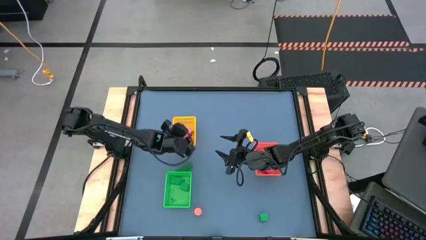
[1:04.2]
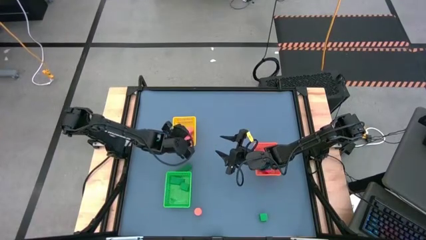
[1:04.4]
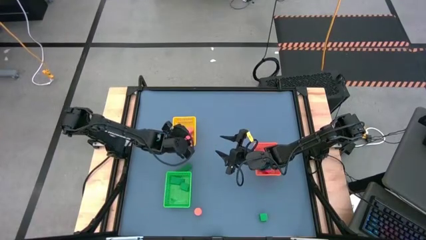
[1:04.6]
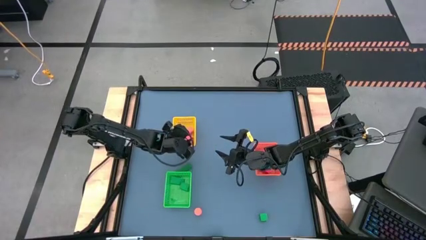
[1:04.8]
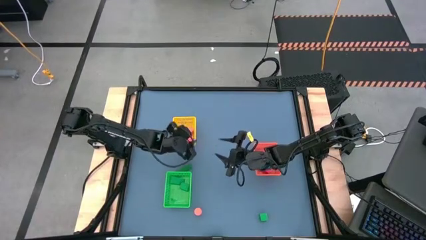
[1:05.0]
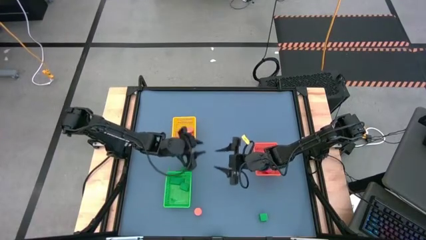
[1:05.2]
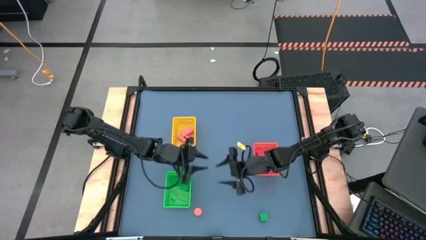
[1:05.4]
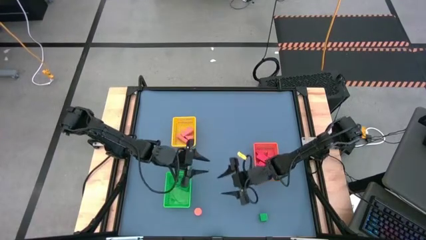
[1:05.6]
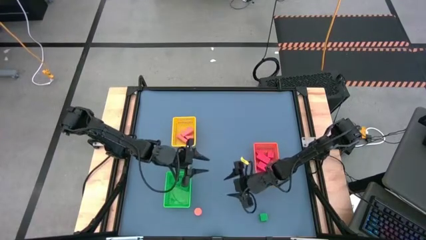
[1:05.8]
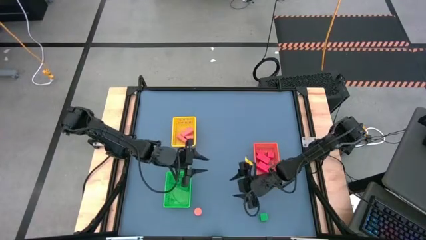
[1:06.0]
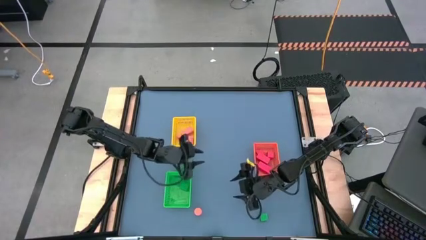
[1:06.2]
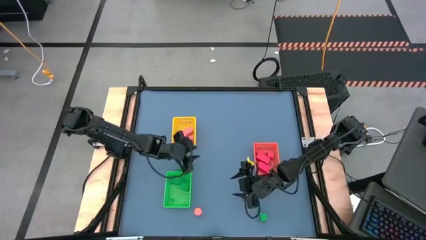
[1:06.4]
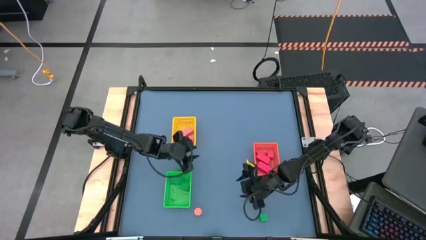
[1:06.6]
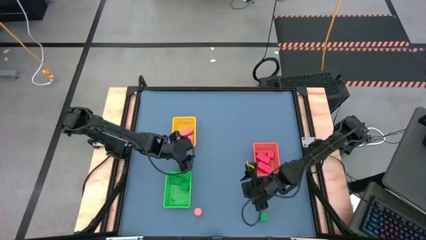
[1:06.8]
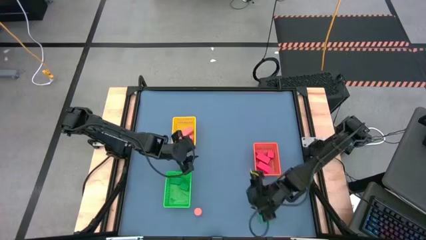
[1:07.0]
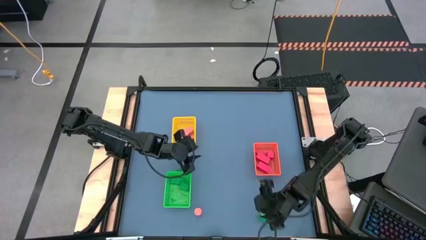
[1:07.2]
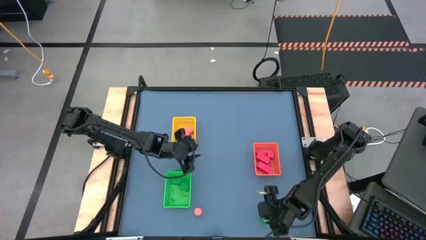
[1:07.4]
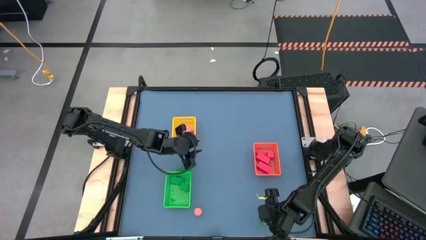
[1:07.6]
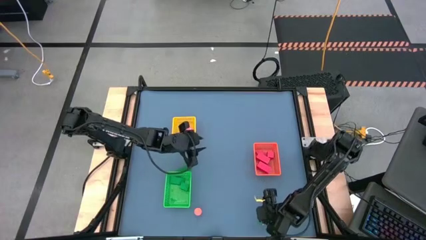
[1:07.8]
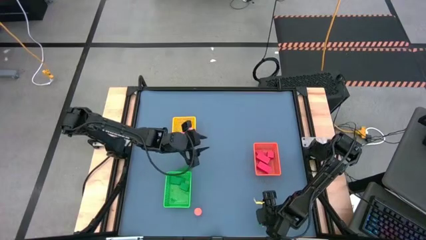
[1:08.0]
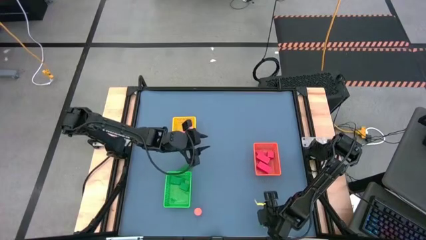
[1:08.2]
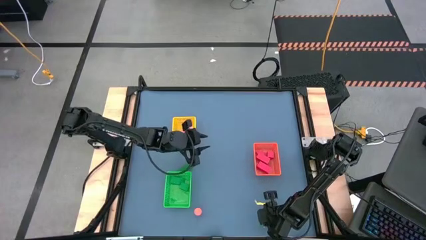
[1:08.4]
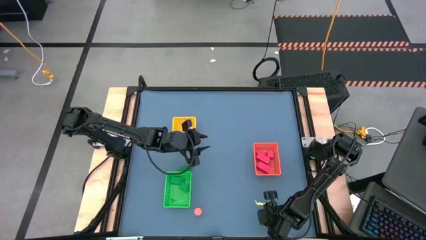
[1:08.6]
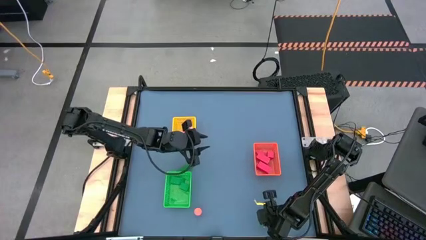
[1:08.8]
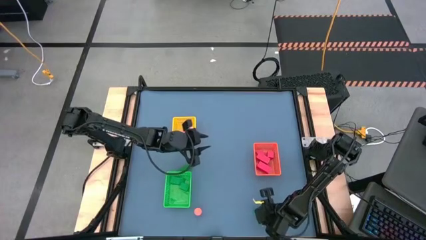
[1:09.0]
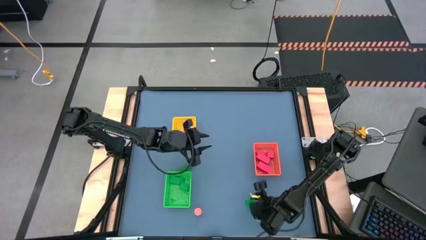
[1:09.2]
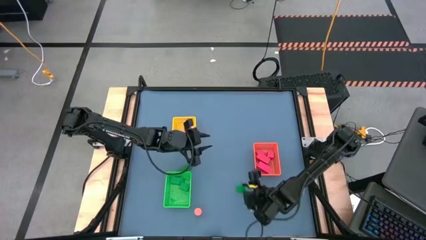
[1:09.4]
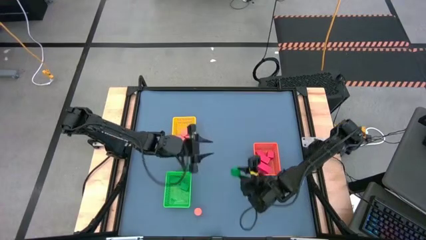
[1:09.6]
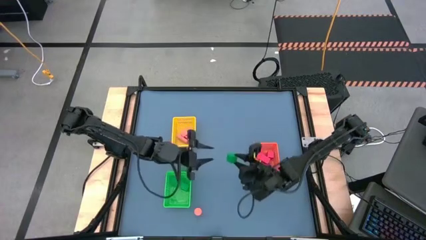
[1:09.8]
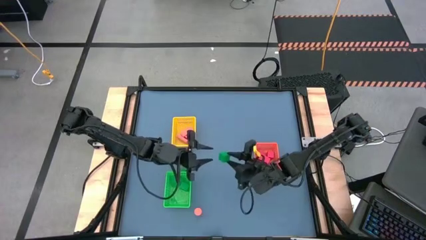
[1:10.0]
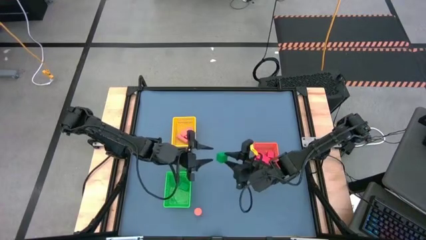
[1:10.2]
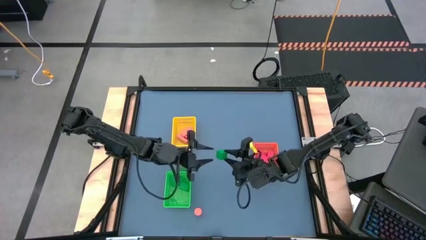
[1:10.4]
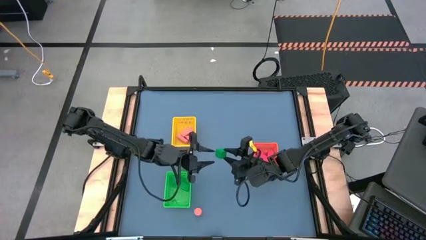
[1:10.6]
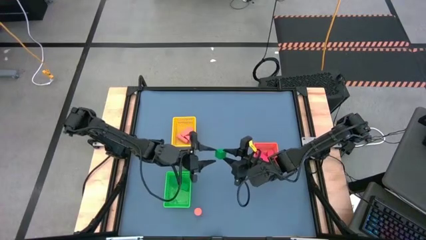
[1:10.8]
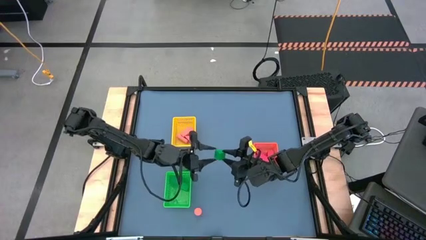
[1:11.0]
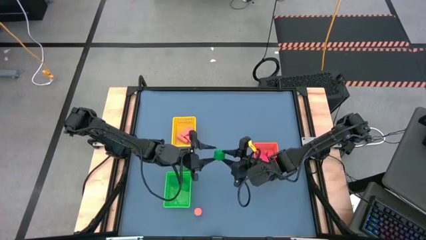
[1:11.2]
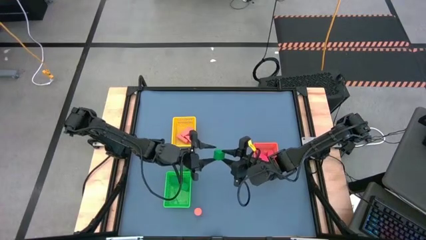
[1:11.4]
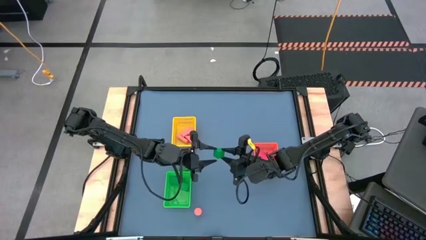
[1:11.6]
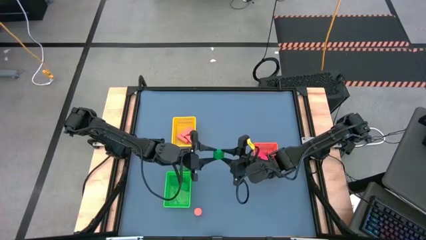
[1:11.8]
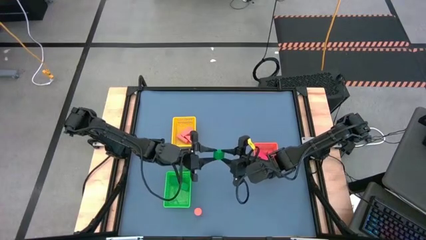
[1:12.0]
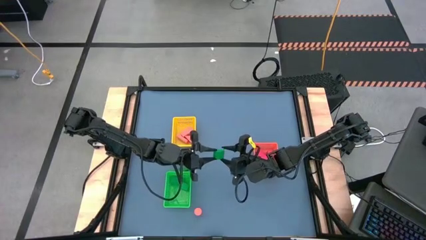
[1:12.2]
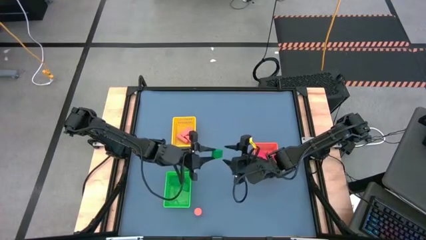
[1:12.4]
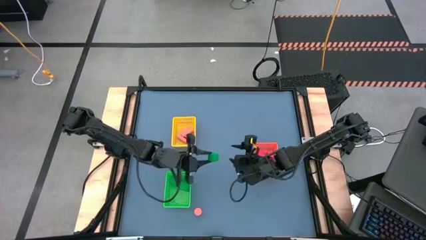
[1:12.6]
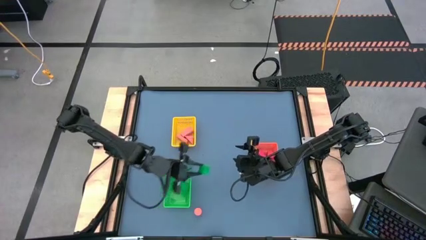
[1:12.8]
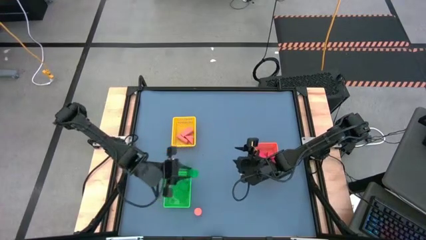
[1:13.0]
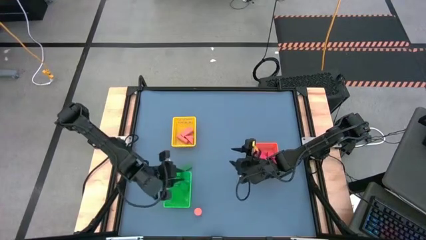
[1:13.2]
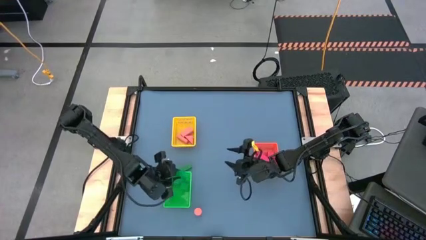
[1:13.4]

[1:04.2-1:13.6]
Task: Sort & place blocks by color
Put the green block into the green bin

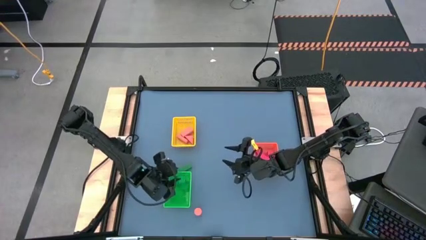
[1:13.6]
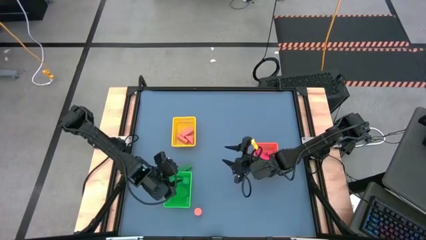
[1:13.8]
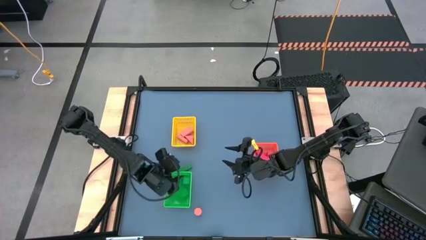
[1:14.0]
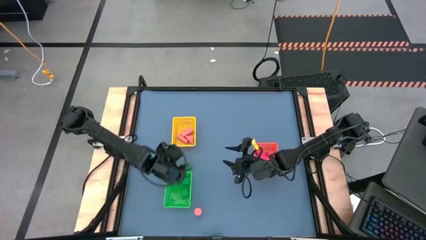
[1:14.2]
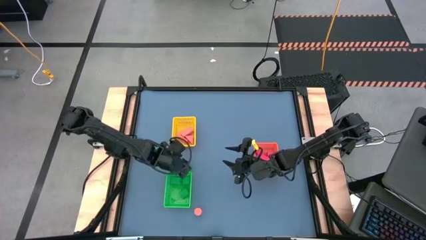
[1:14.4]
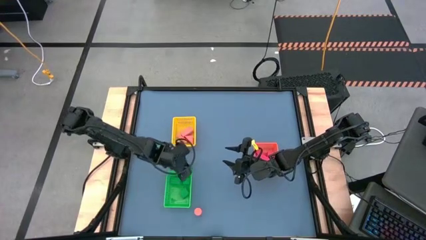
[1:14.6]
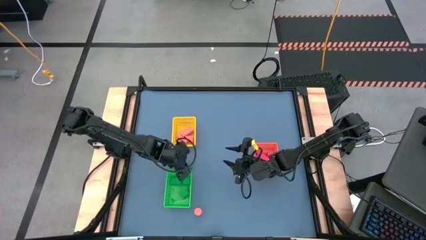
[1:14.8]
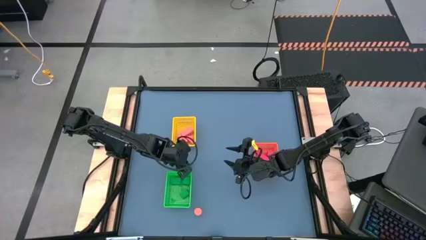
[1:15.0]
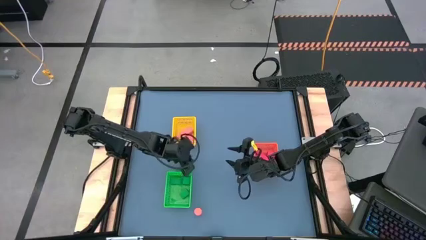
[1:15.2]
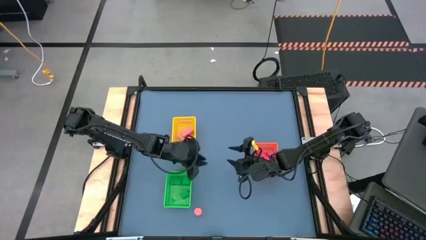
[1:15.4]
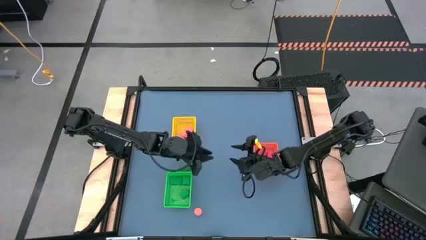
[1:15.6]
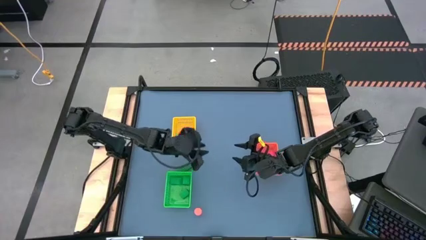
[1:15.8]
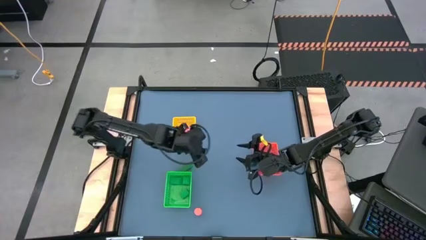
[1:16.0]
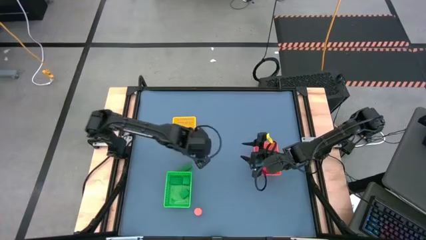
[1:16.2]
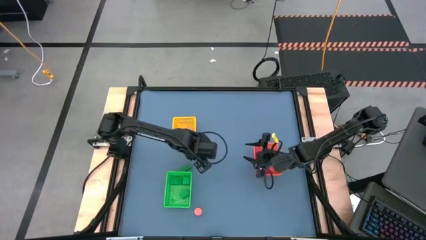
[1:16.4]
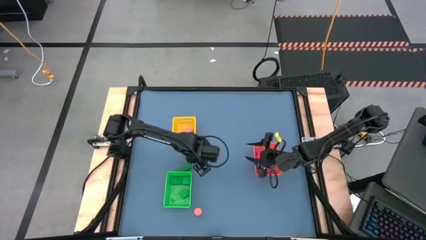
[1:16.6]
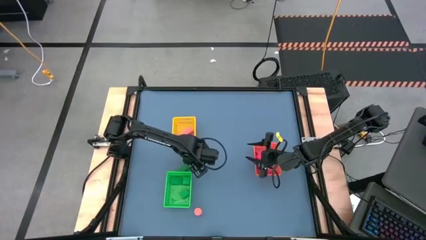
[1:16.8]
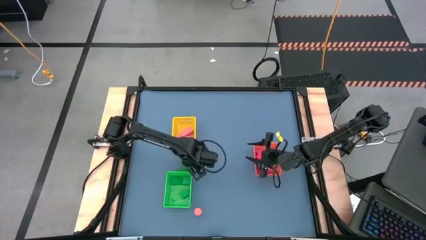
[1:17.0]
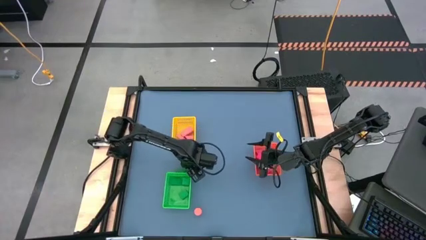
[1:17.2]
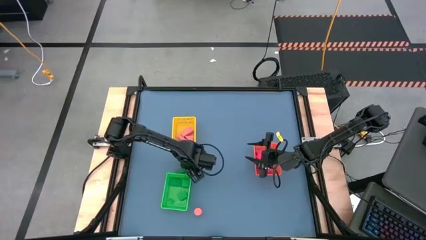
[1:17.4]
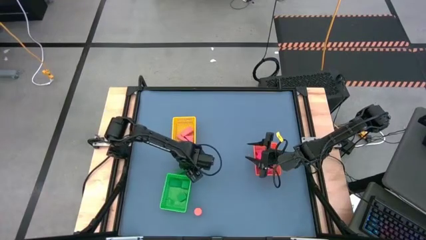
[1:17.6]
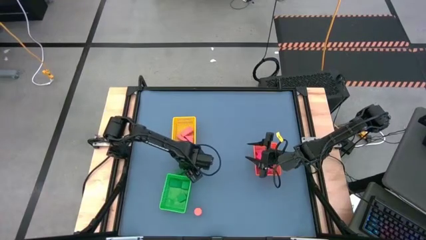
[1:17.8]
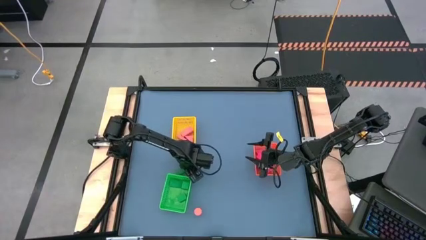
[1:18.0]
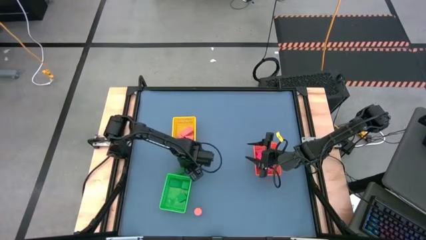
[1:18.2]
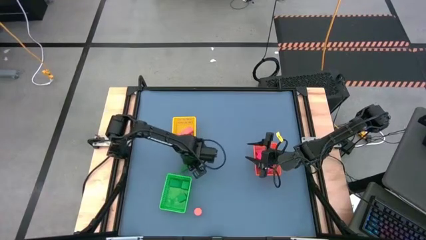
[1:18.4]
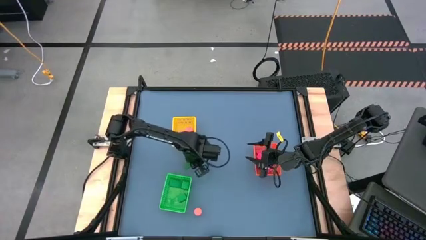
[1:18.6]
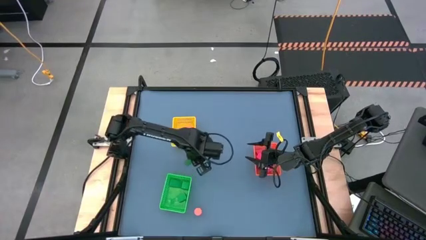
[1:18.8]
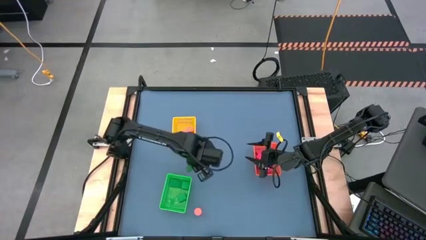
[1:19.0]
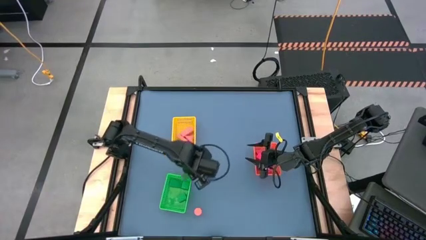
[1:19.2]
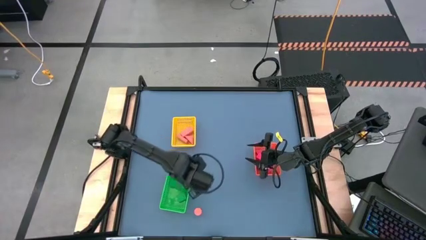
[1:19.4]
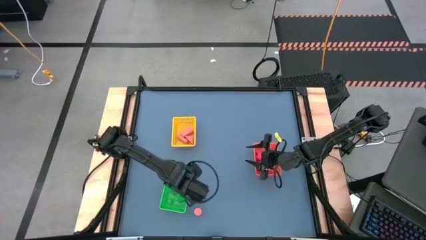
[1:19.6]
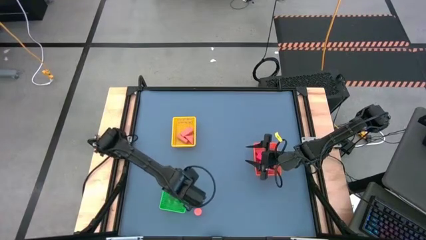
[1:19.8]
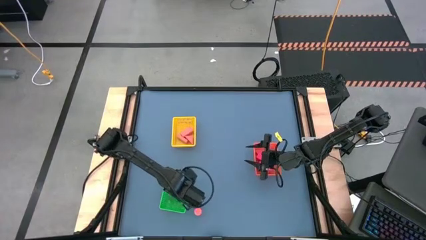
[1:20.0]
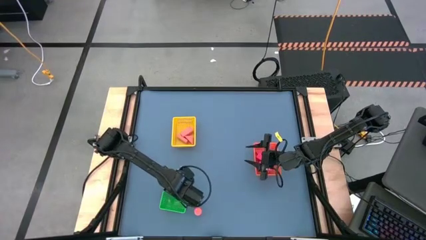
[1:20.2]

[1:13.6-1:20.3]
Put the green block into the green bin

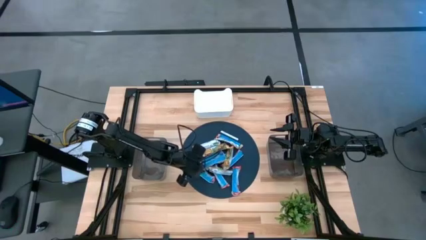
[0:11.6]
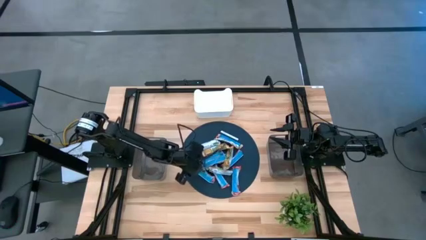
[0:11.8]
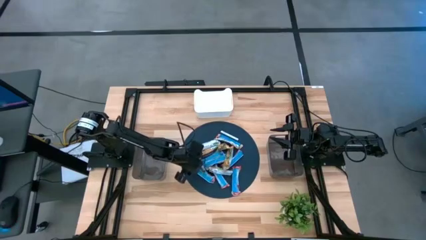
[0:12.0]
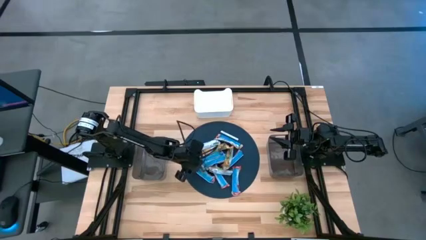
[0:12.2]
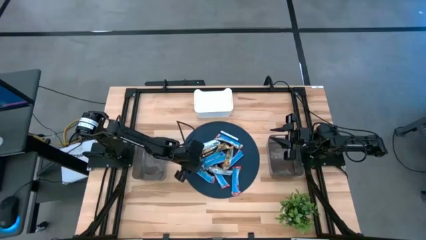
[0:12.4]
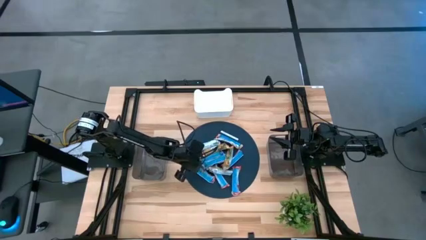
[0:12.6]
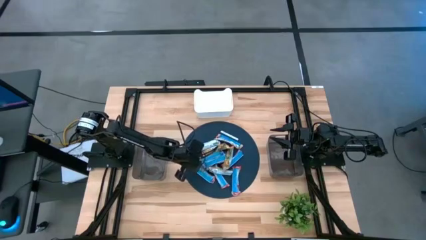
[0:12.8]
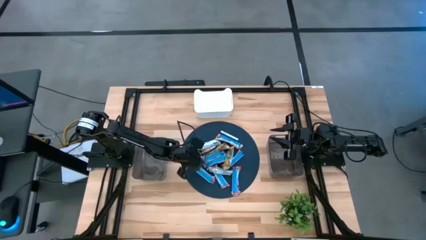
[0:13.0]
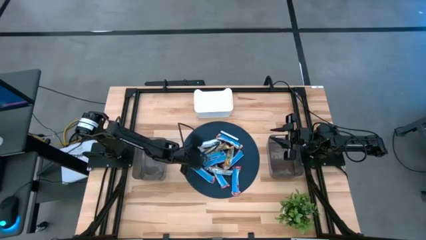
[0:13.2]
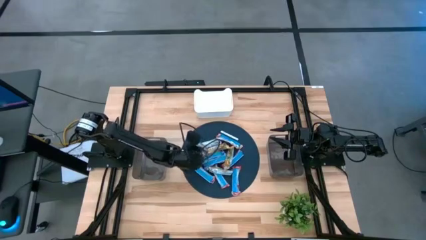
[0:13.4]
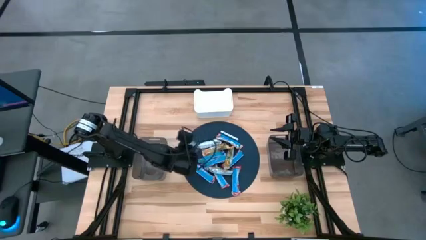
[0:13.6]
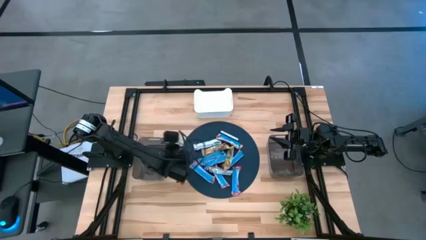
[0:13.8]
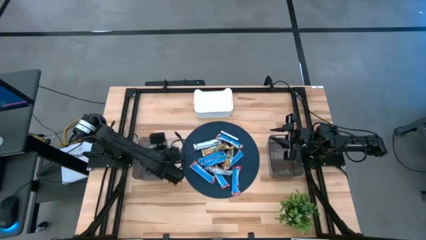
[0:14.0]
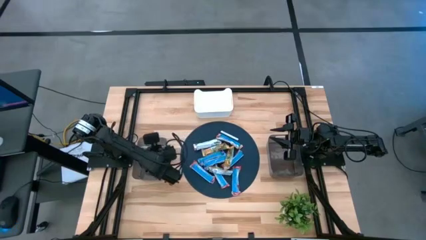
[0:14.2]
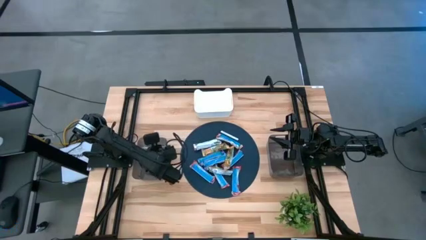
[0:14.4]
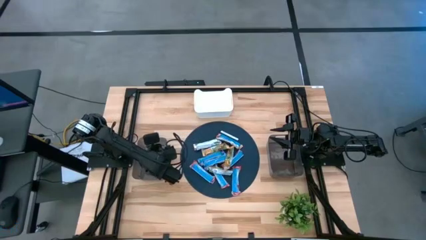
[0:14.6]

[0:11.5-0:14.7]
Task: Pick and place Granola Bars by type
Put the blue granola bar into the left black bin
